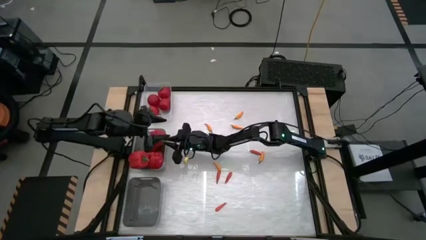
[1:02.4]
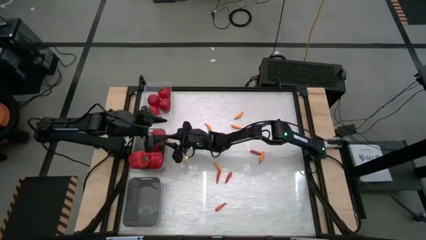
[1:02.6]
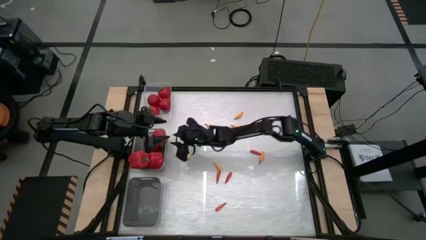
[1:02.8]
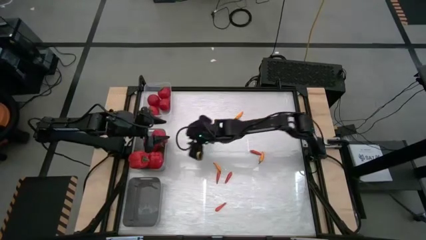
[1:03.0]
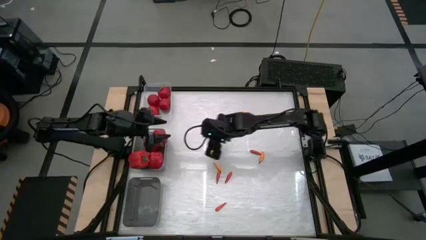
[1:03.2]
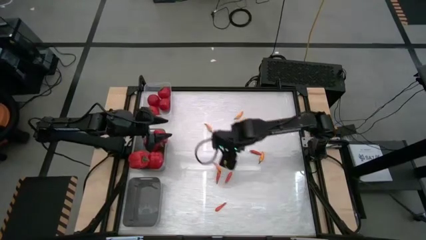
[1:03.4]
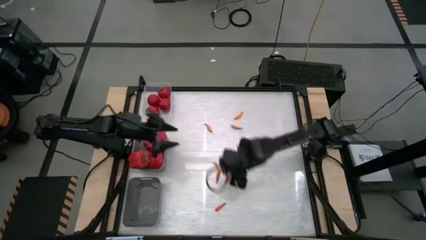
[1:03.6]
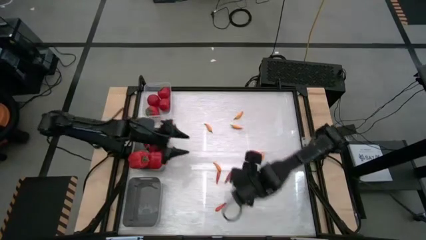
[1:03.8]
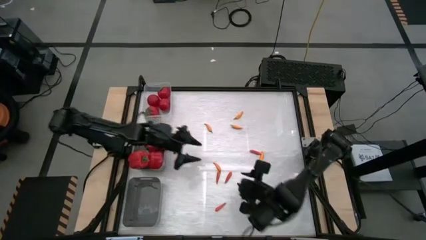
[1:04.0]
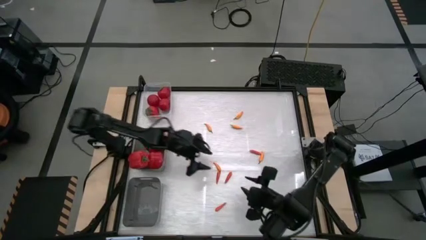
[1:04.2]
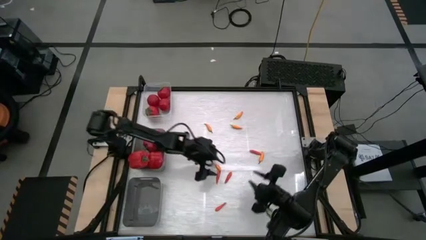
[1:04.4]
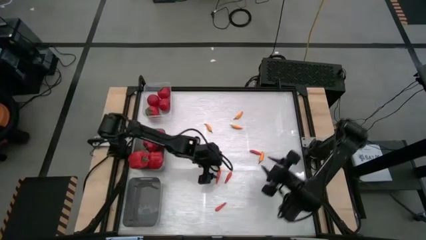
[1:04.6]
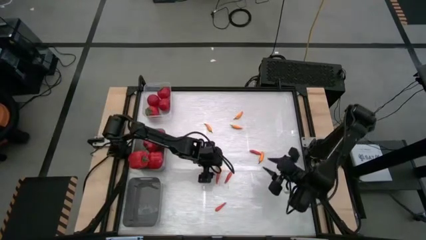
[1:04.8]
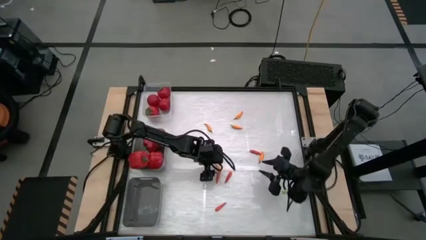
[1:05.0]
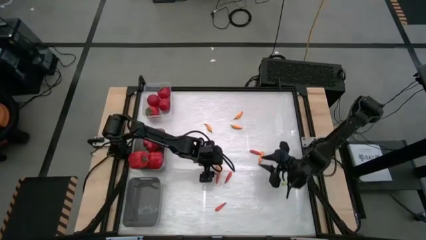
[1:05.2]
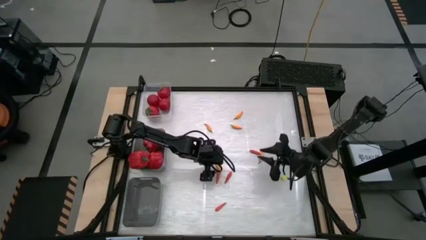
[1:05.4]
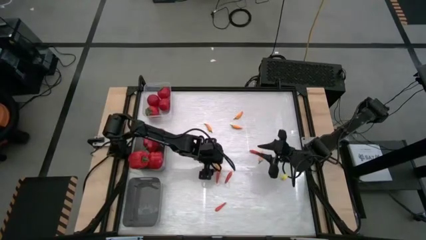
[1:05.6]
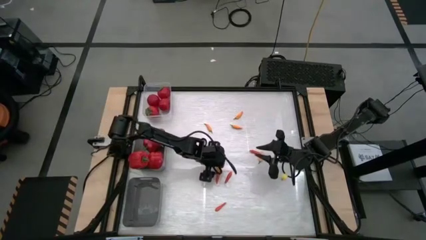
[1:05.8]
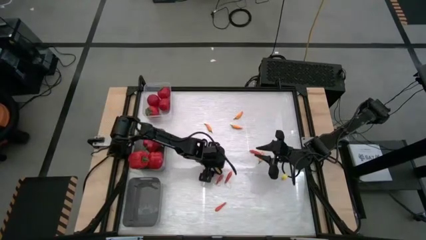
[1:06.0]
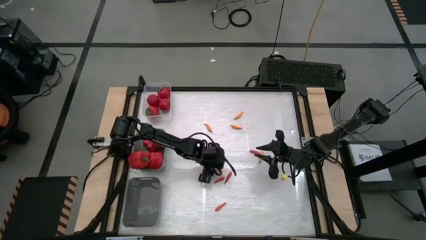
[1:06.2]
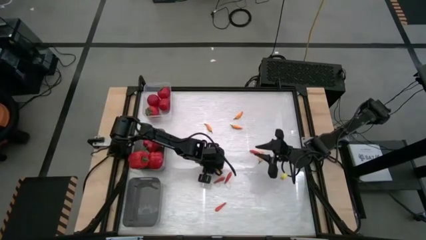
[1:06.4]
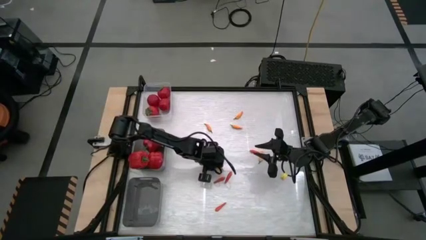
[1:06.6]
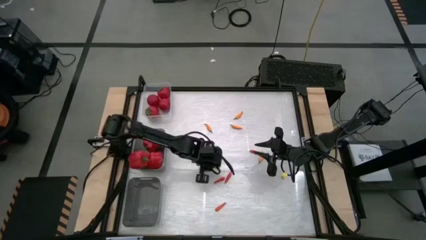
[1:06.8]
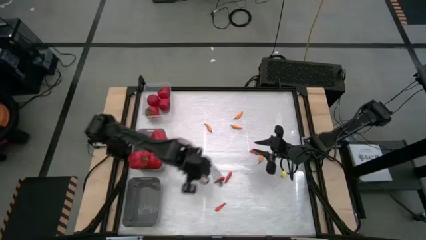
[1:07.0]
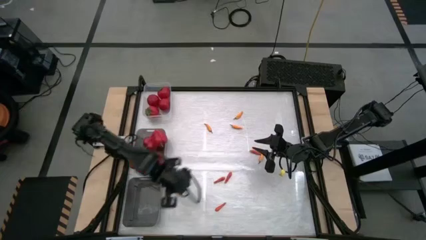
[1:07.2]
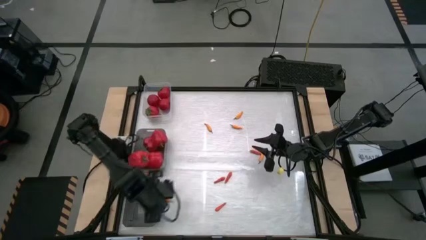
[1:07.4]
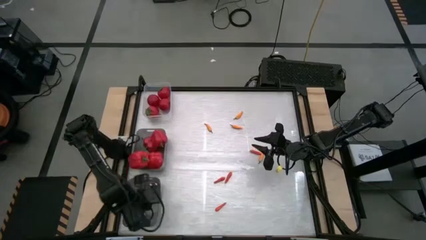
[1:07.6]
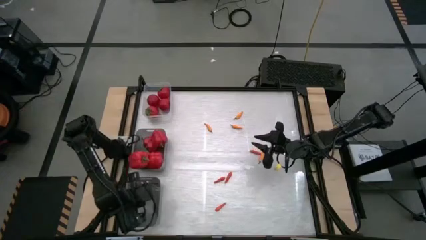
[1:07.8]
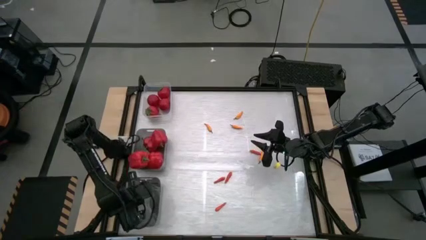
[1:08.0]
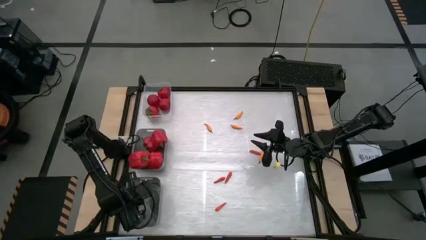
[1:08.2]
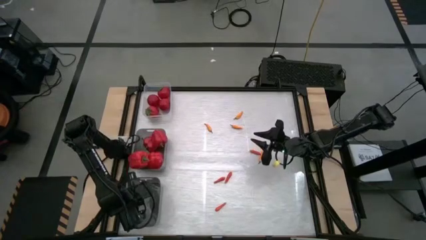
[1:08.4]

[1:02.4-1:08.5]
Task: Sort produce into baskets
Put the yellow chili pepper into the bottom gray bin

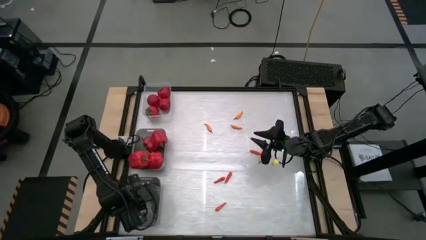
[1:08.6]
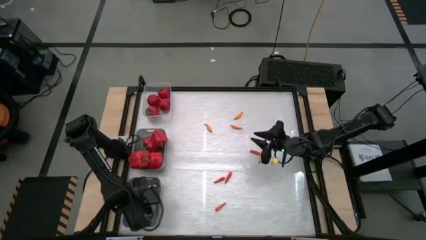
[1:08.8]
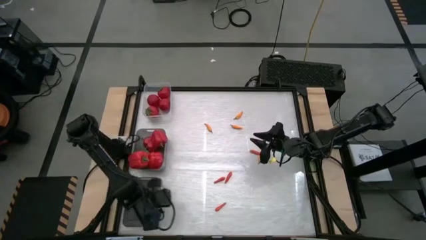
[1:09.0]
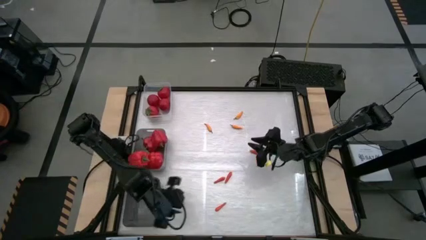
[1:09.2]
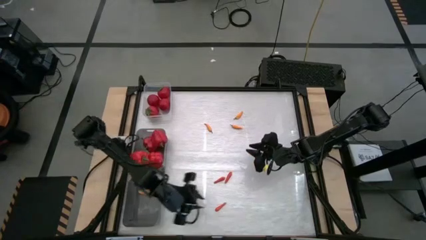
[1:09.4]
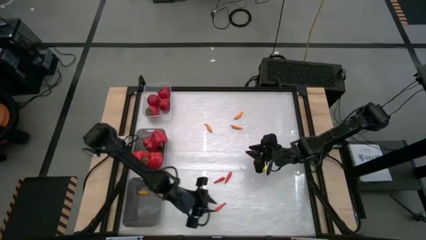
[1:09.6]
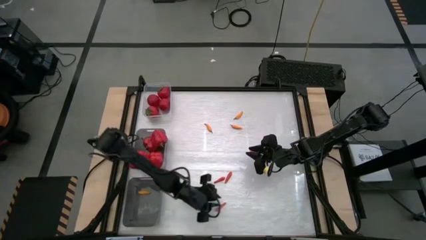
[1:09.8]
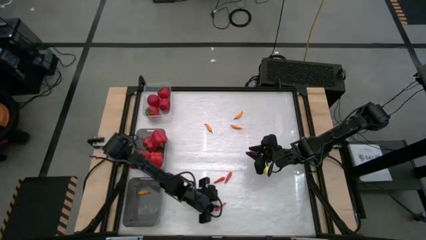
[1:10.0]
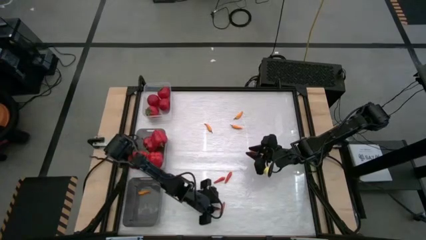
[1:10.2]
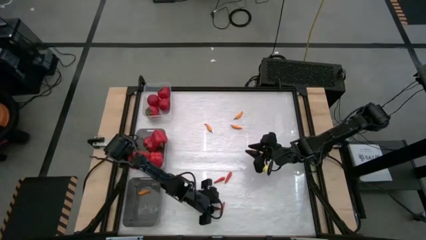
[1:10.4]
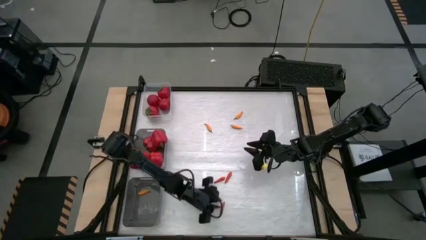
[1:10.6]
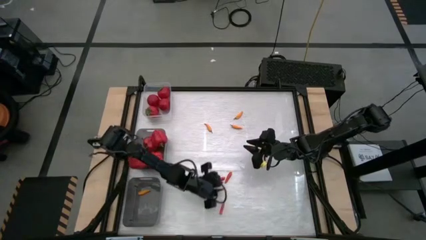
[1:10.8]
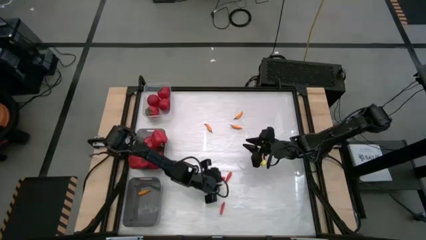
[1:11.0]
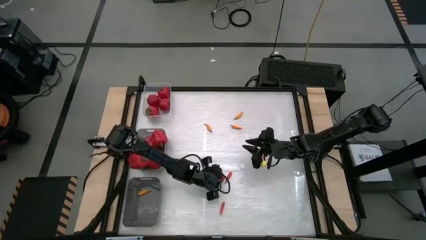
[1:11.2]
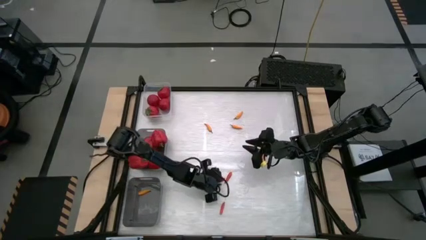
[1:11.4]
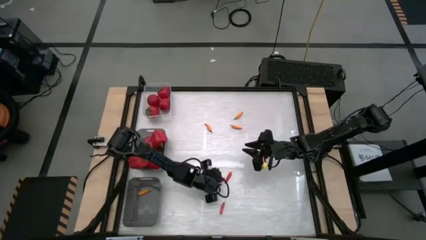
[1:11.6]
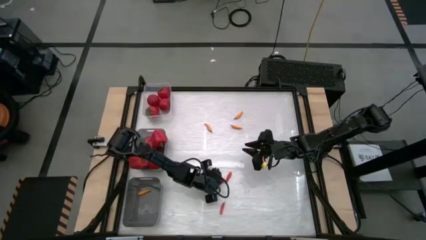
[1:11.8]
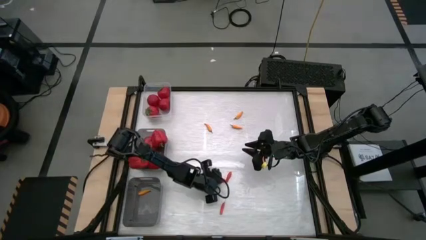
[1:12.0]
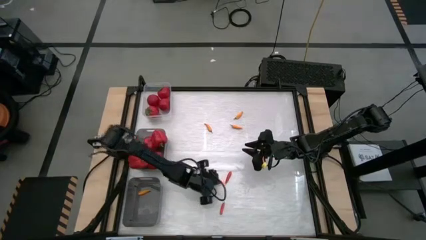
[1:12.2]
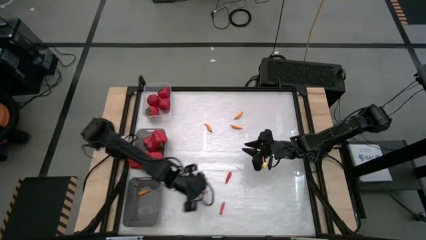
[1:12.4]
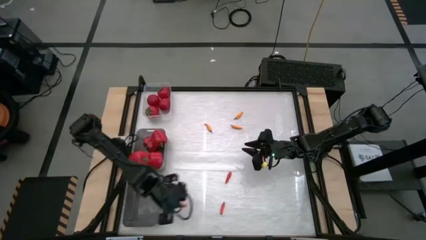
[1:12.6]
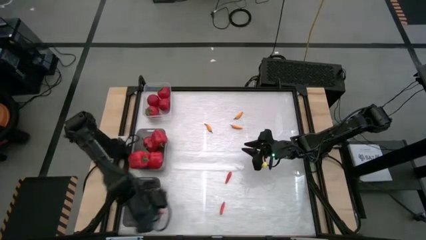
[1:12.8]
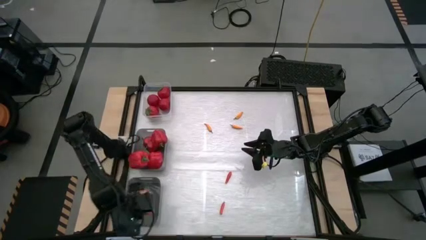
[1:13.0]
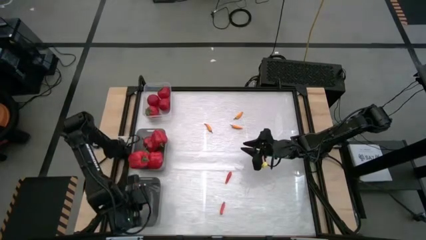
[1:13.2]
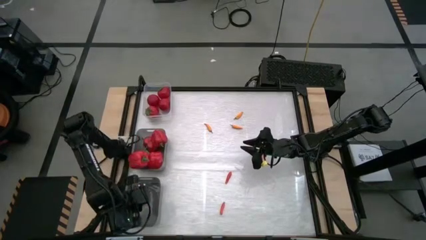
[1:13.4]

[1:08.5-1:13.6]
Put the orange chili pepper into the bottom gray bin

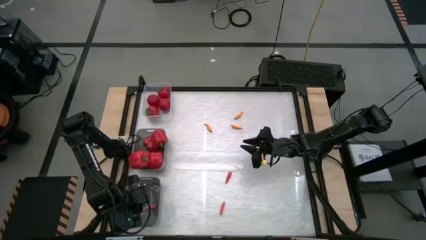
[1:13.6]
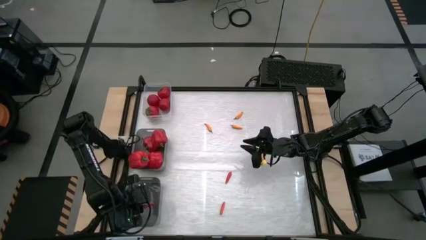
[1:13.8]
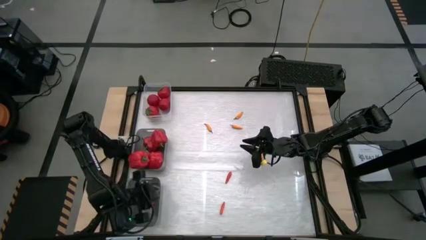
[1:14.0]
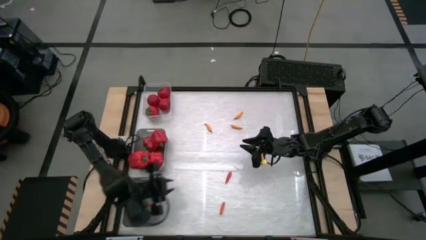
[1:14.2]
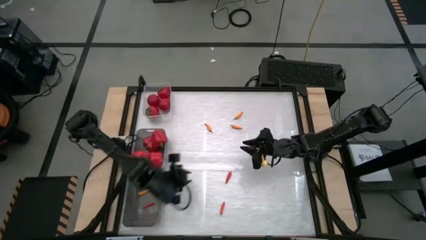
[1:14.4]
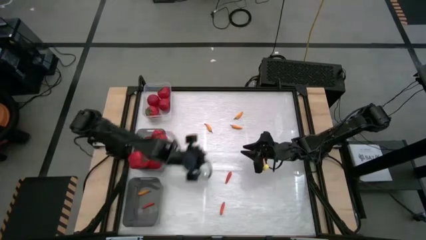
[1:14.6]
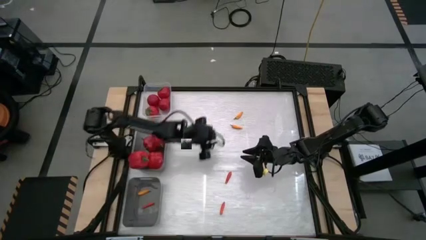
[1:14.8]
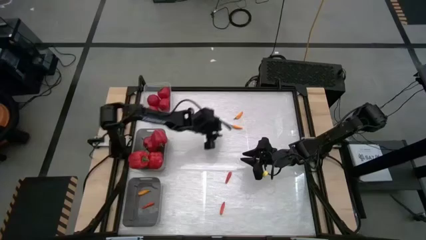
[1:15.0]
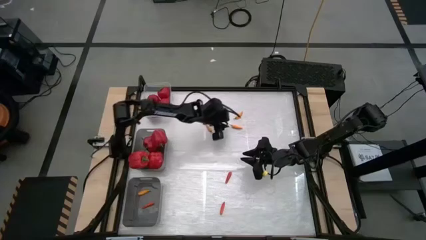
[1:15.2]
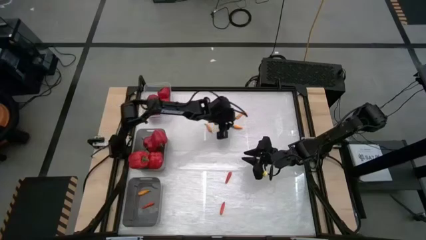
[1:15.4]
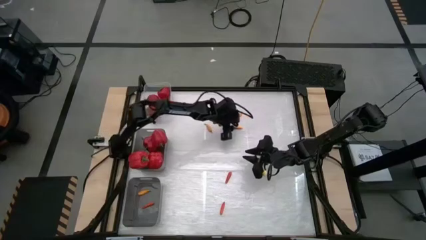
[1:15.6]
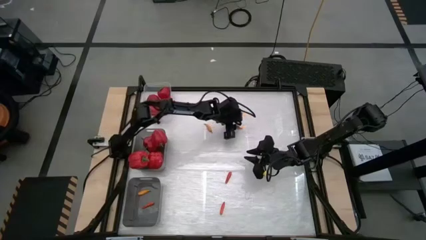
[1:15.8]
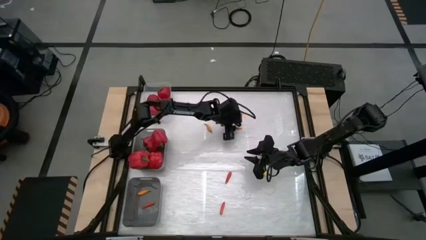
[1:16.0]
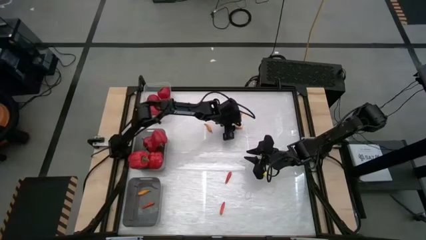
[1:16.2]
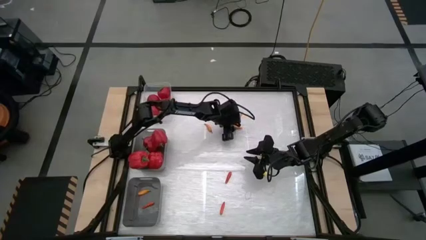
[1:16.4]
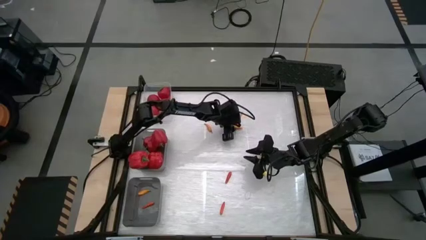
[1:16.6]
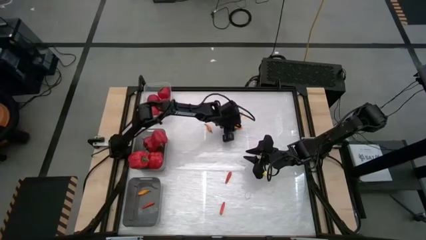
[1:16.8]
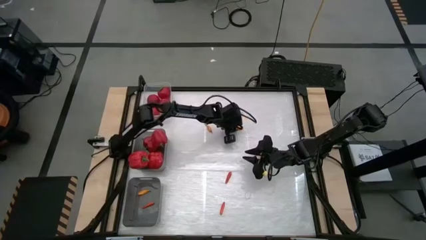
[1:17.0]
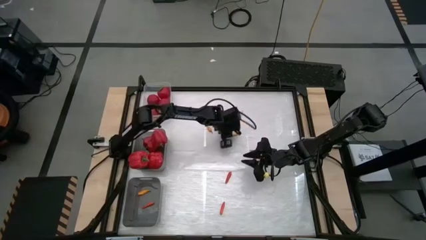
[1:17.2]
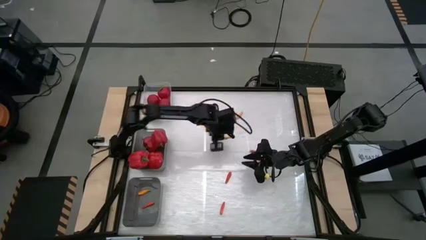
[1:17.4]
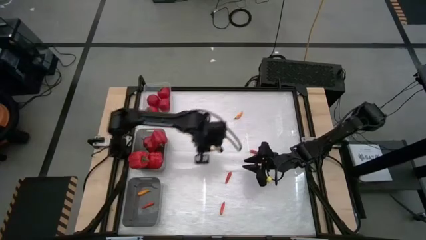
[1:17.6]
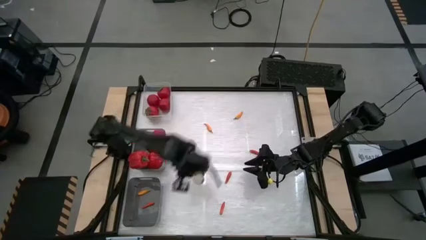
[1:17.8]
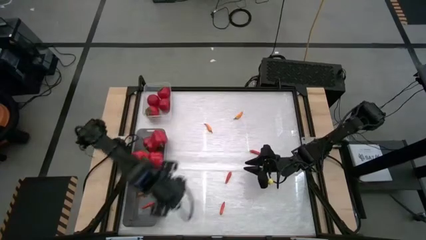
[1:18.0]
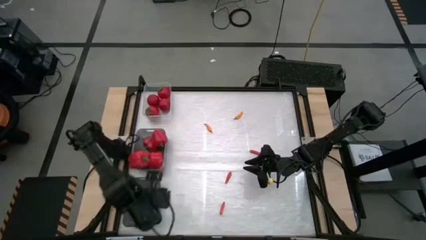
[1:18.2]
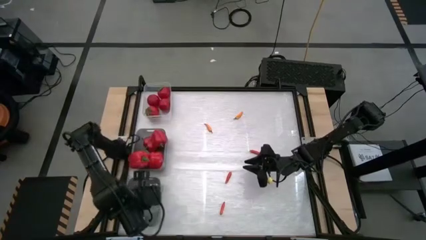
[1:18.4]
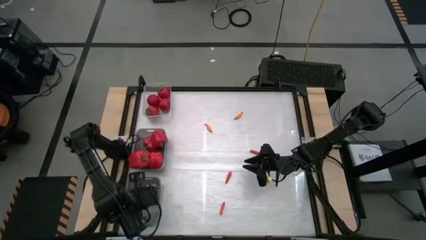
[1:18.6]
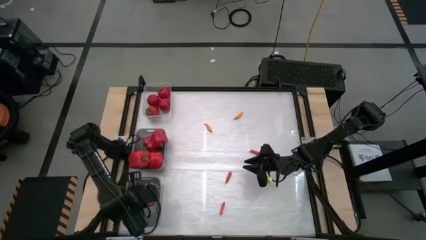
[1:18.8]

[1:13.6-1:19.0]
Put the yellow chili pepper into the bottom gray bin
